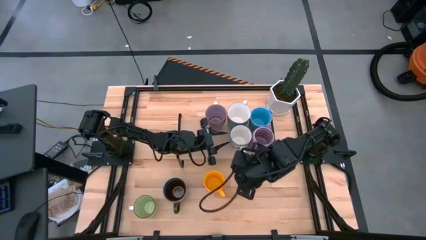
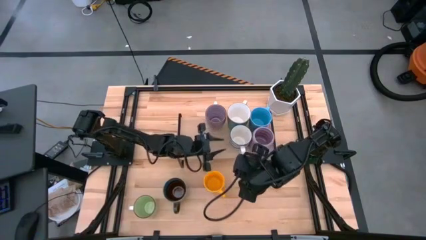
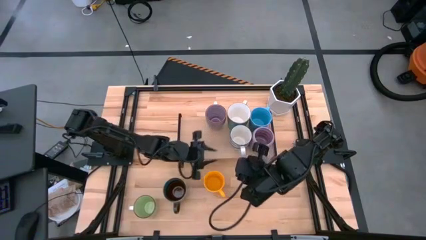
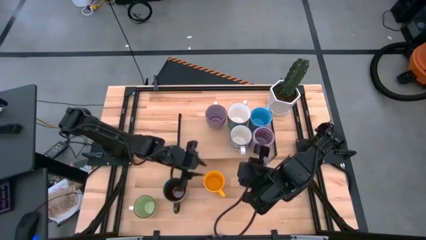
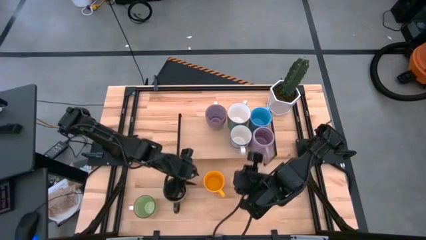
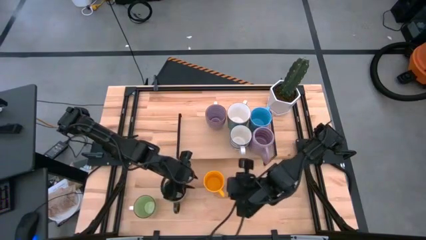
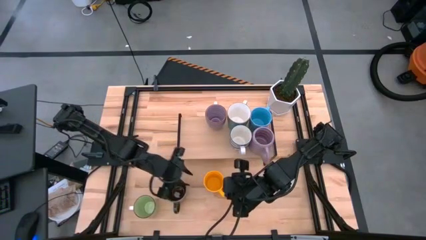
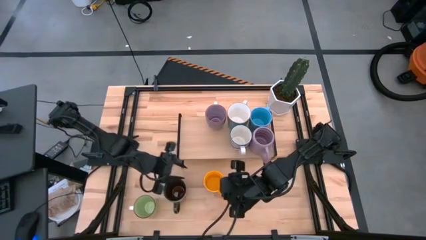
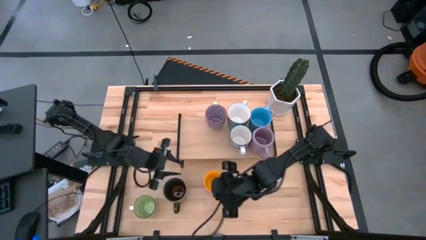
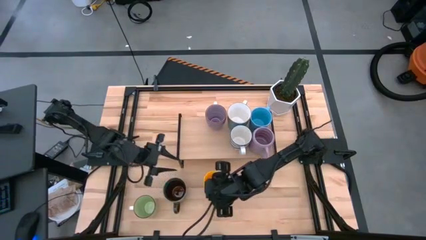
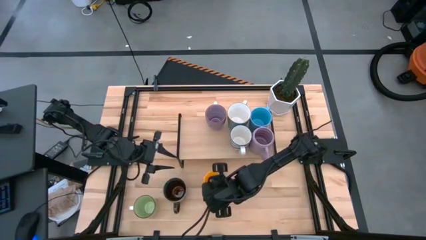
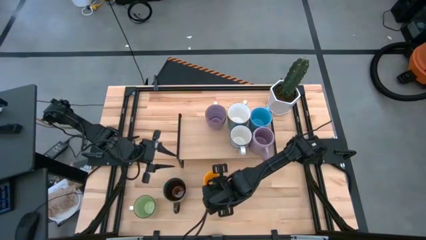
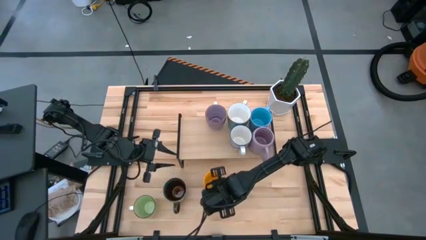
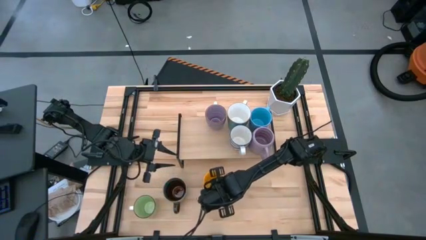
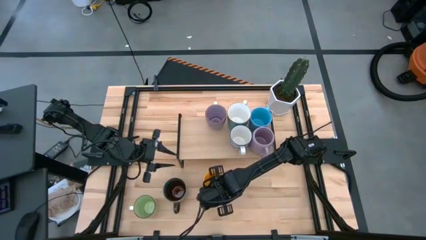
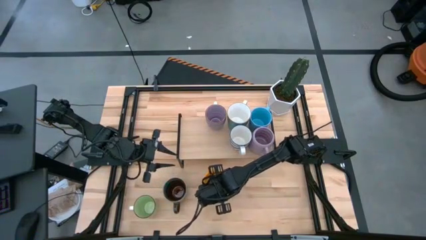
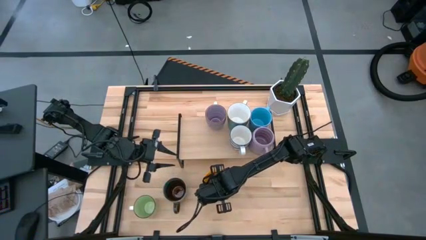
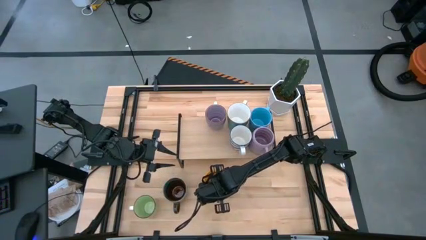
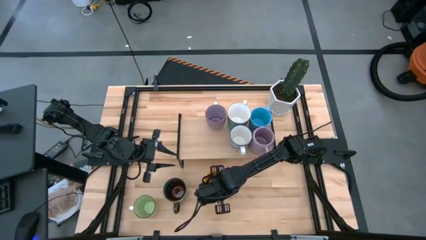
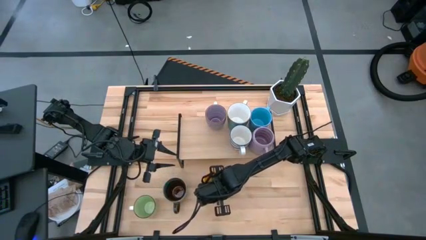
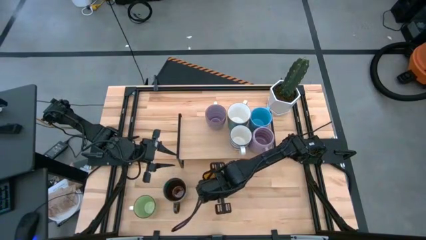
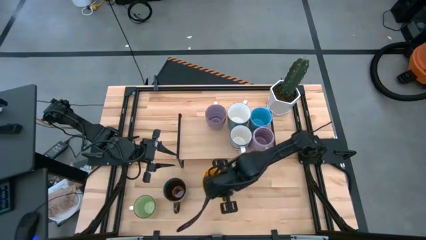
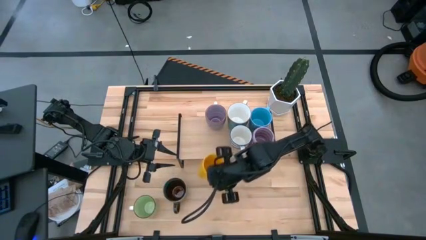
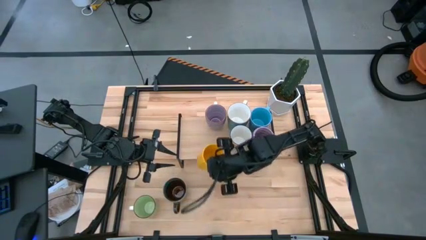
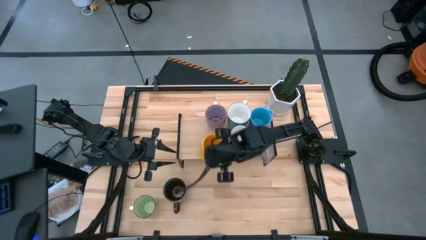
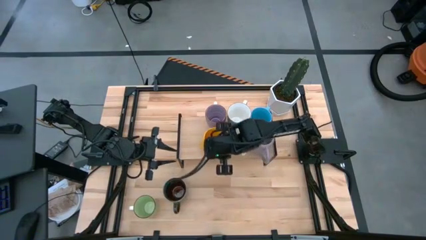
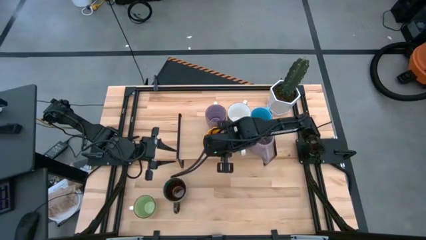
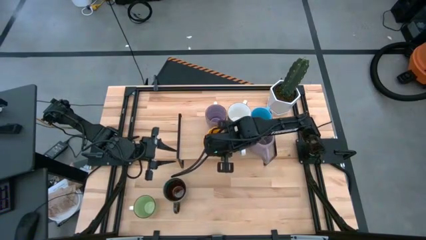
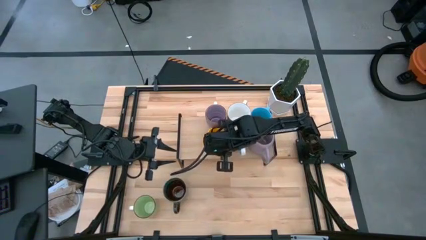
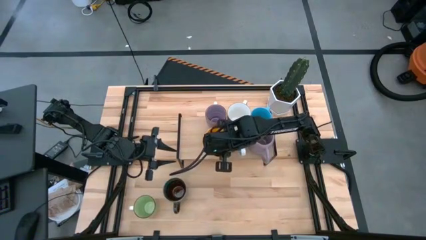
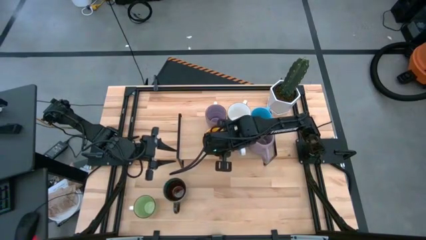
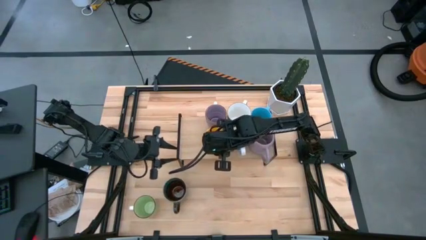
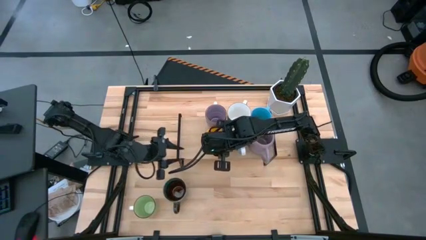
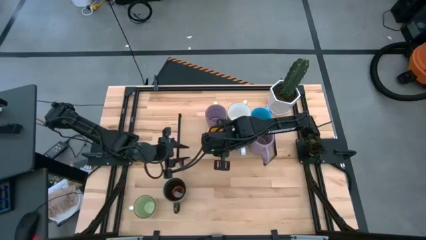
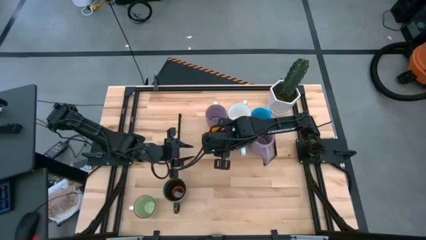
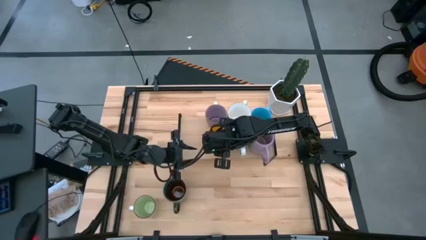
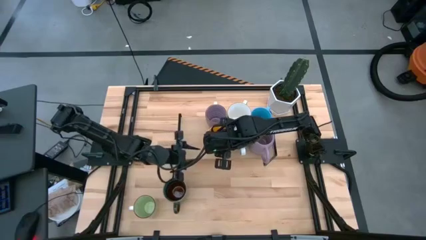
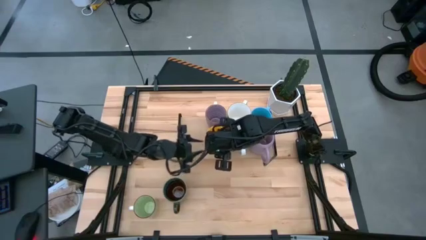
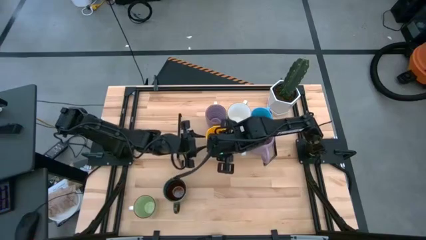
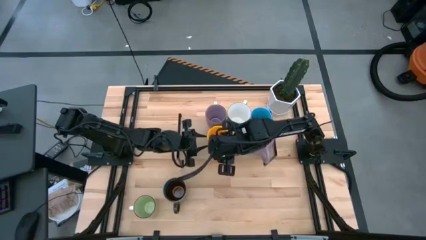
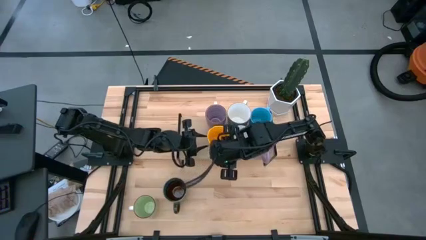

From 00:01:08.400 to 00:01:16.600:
Task: Place coffee mugs
Put the yellow cup on the shelf aligned with the purple cup

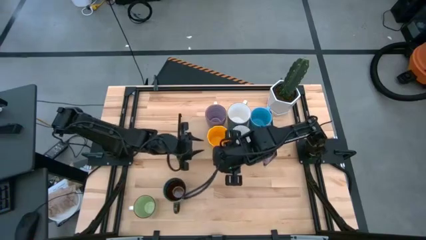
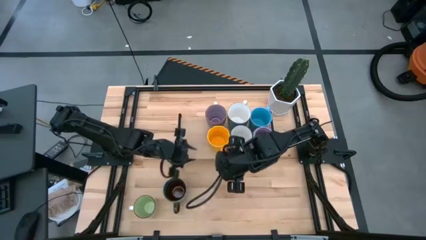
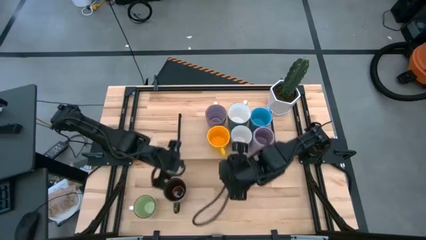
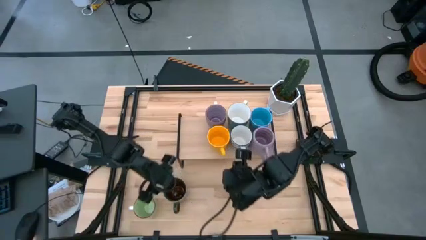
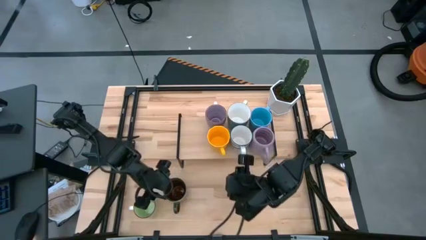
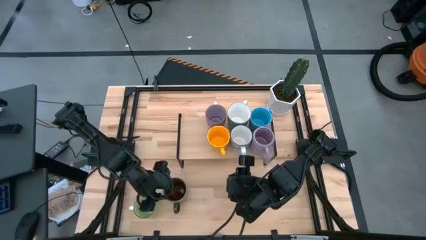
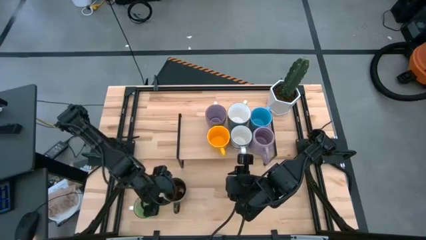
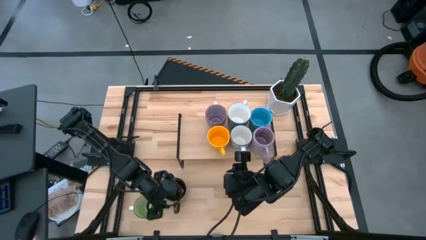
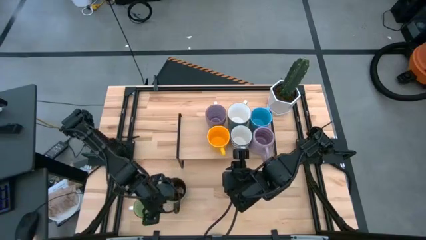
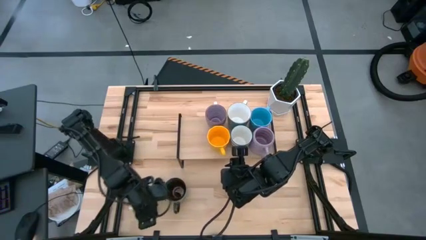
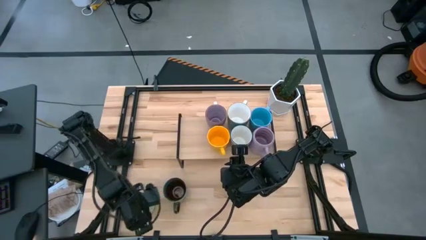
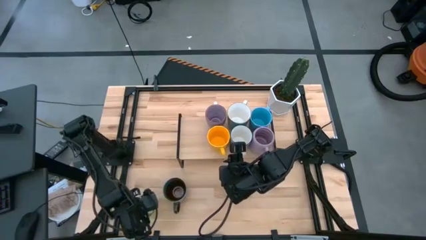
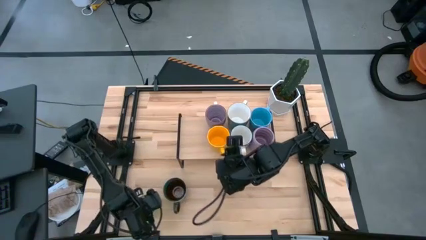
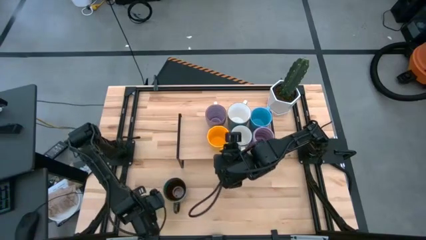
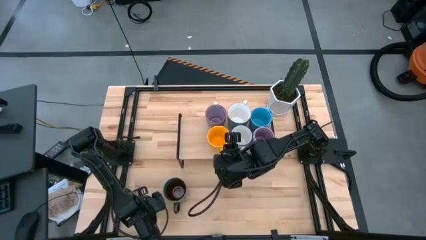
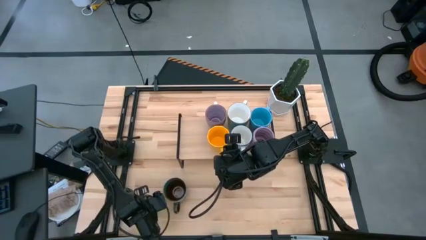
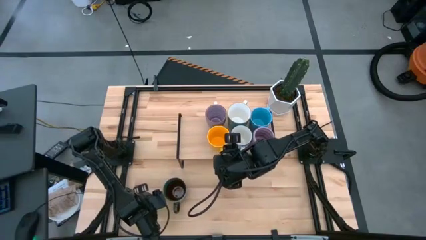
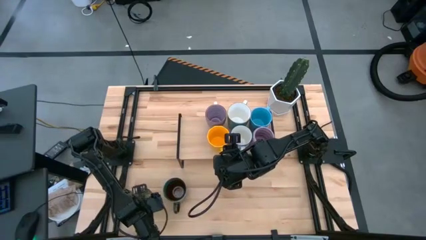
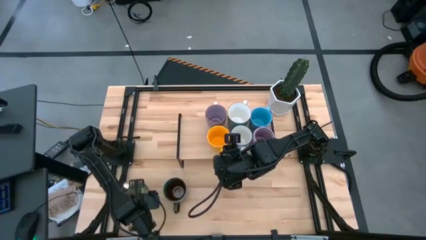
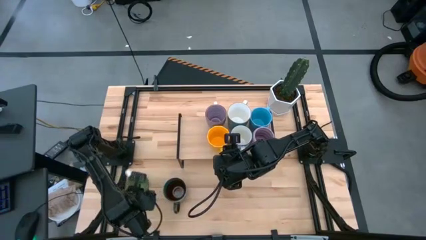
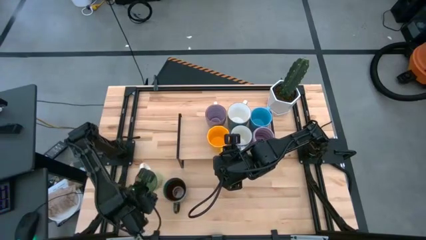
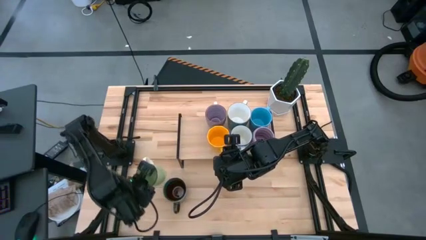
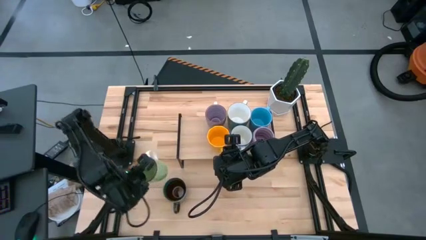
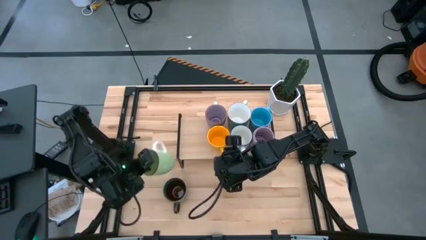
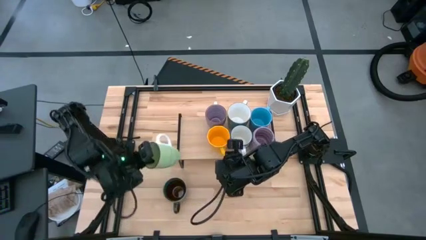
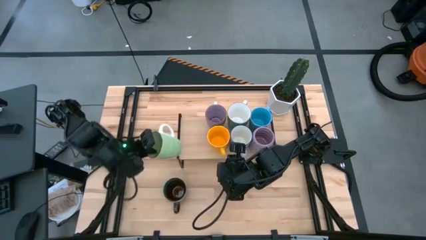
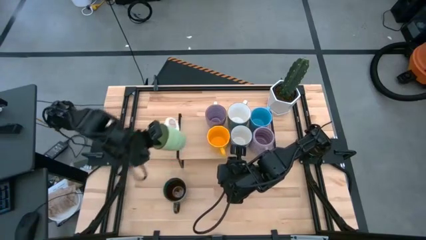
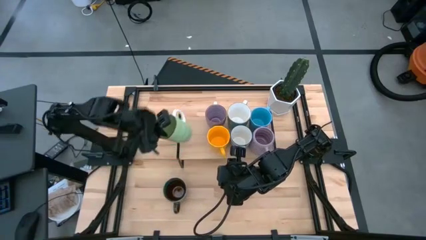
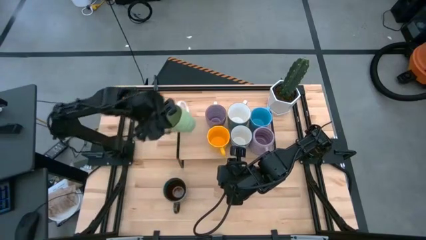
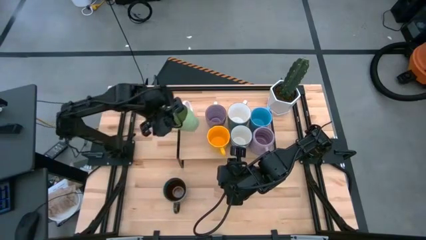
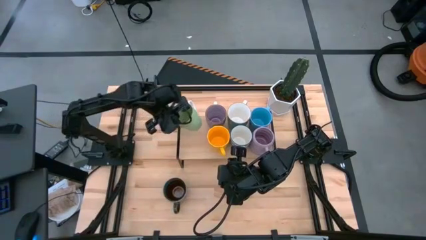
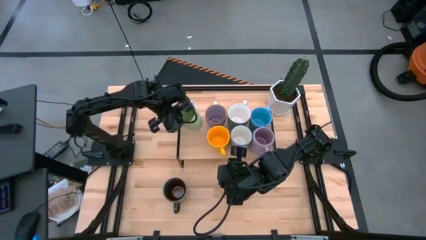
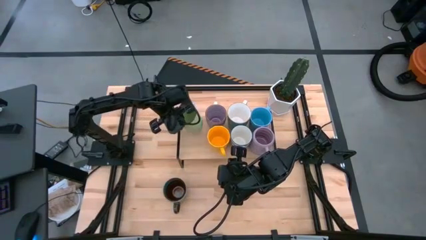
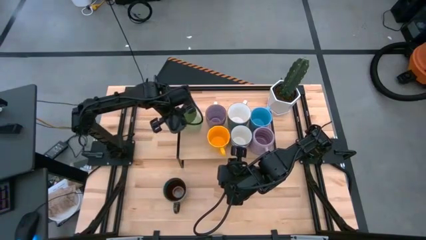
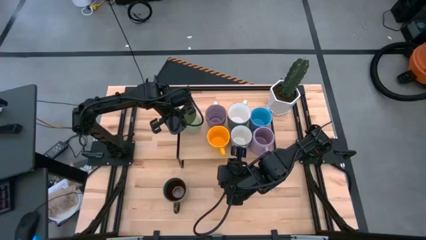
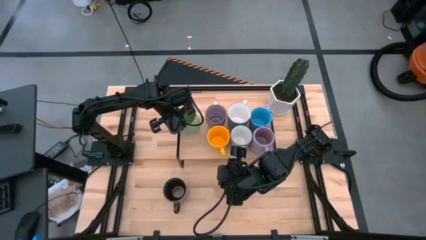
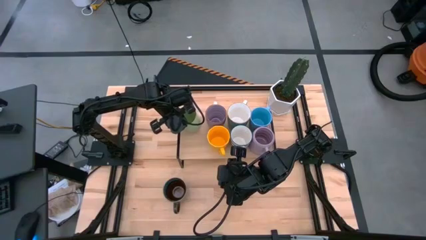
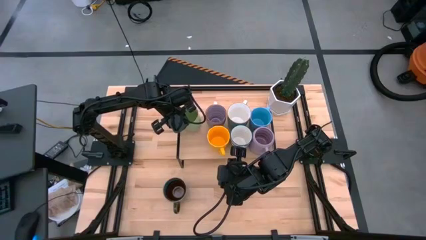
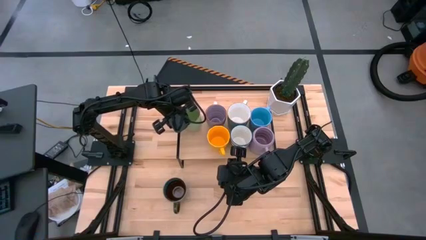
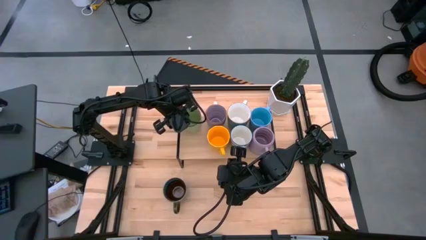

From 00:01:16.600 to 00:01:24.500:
Put the green cup on the shelf
